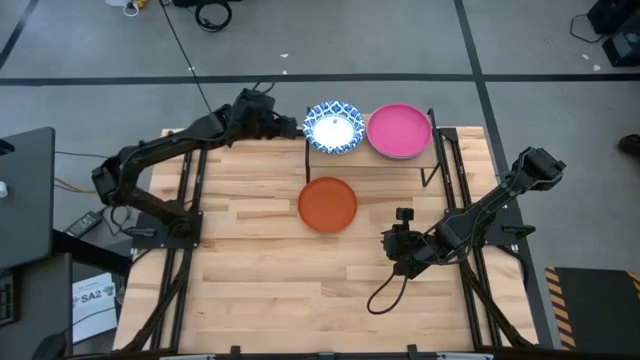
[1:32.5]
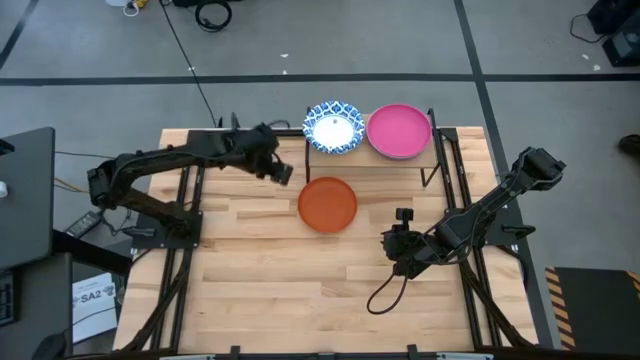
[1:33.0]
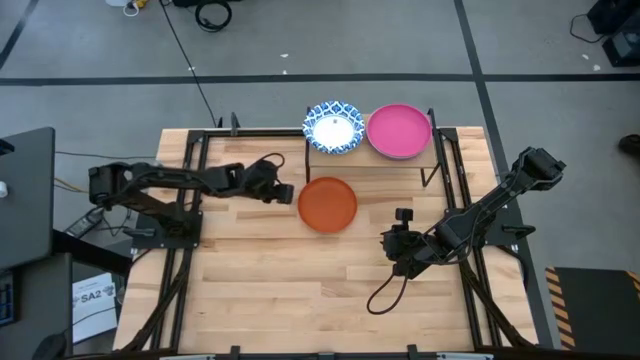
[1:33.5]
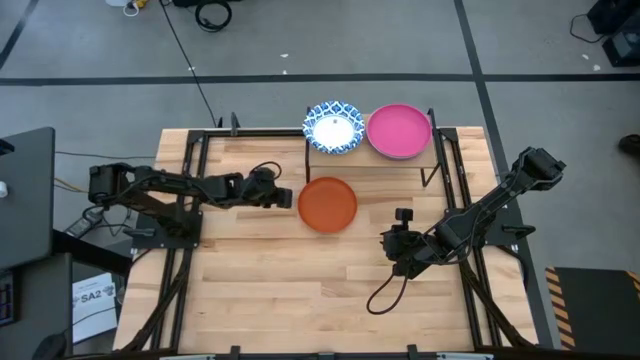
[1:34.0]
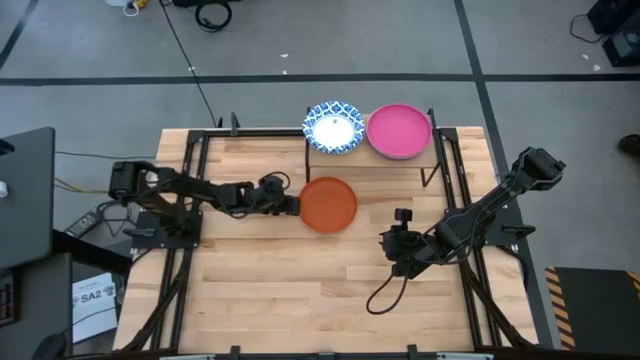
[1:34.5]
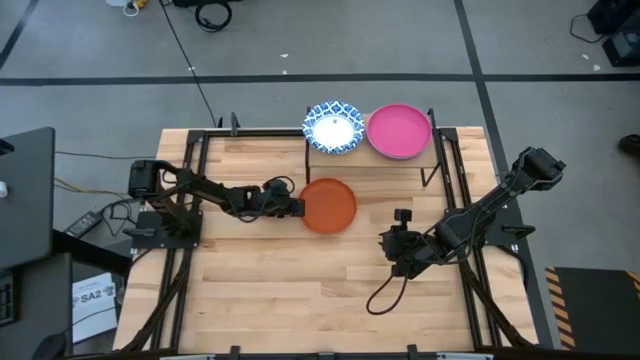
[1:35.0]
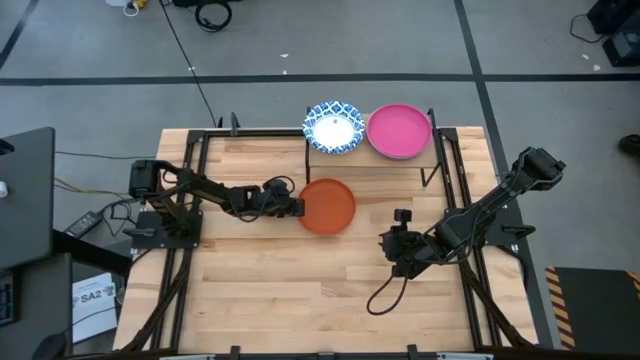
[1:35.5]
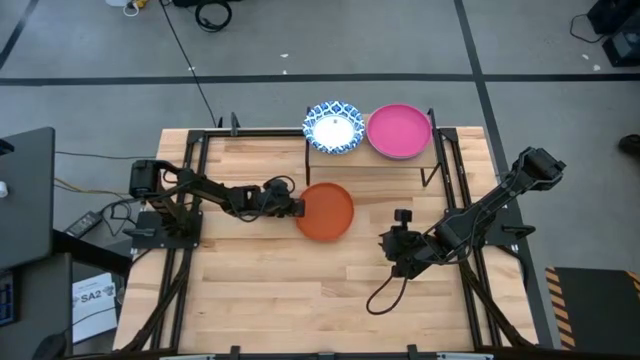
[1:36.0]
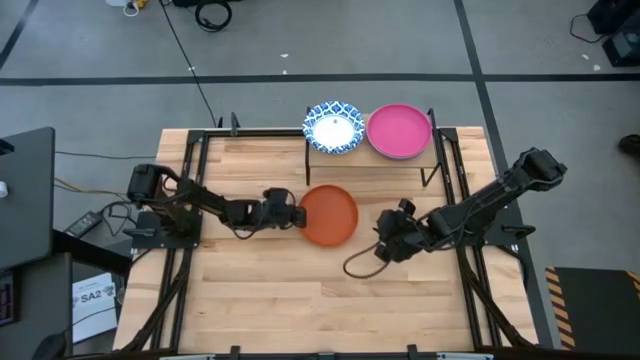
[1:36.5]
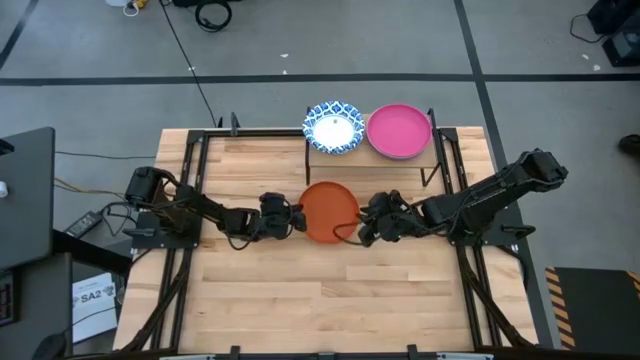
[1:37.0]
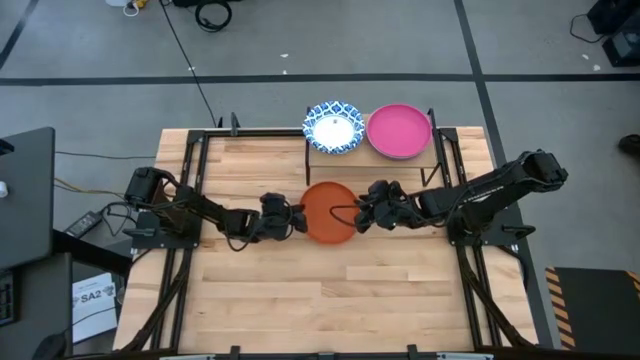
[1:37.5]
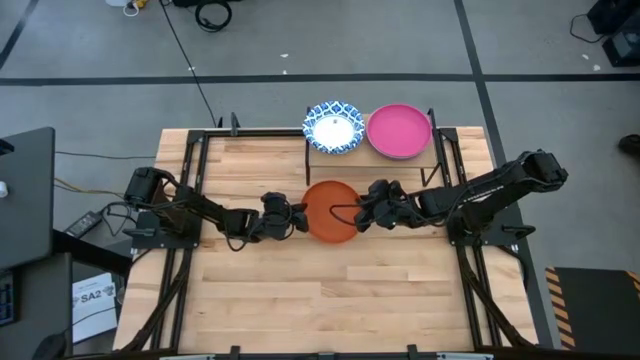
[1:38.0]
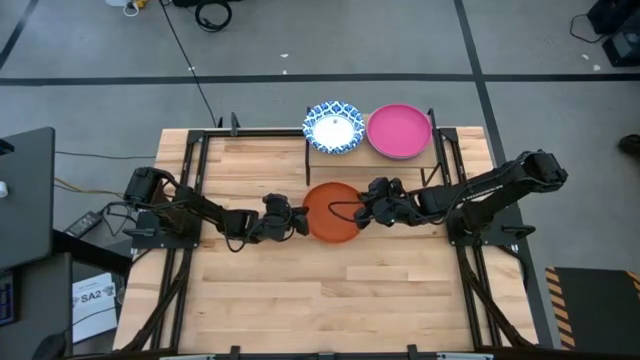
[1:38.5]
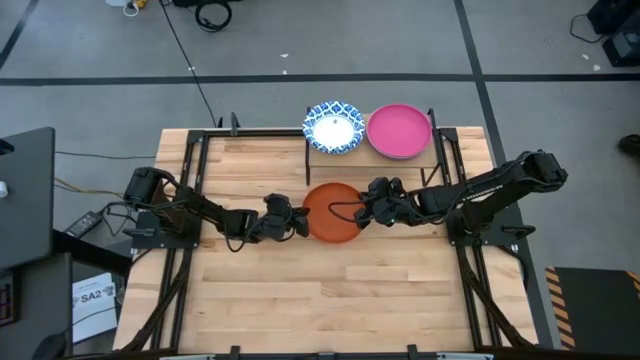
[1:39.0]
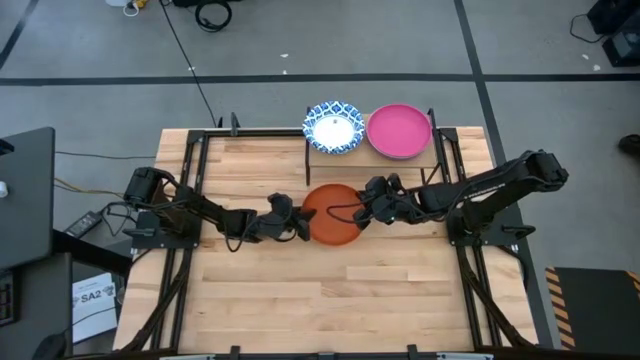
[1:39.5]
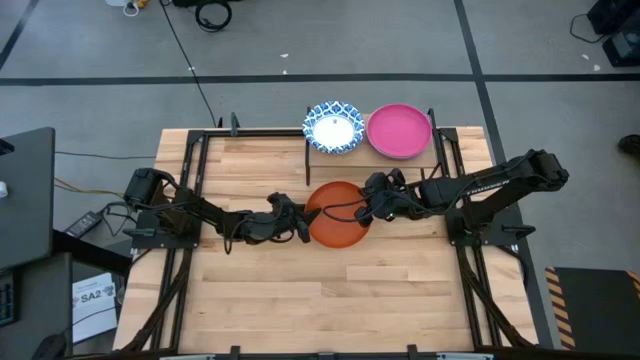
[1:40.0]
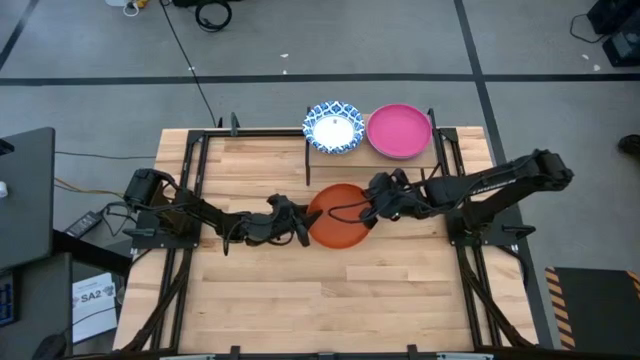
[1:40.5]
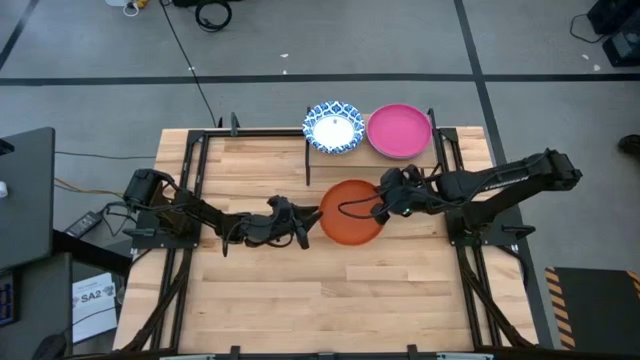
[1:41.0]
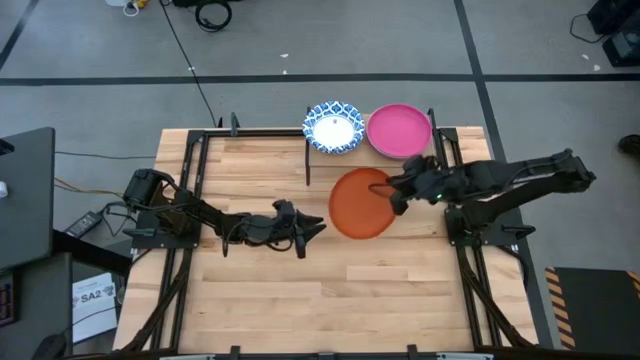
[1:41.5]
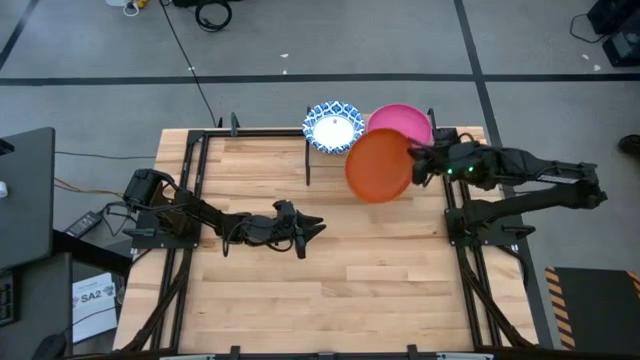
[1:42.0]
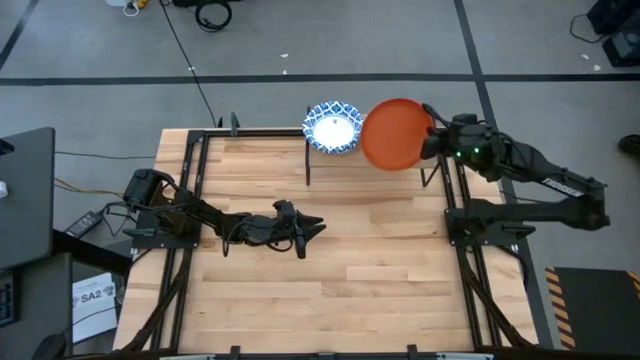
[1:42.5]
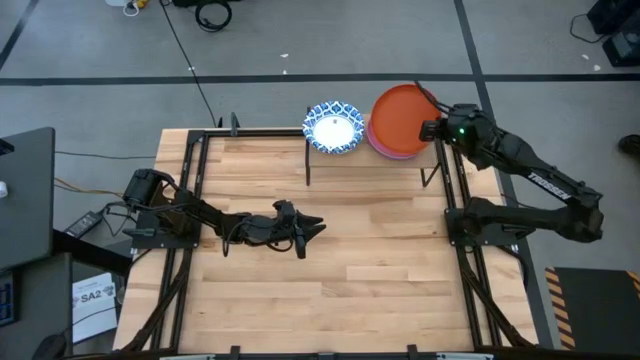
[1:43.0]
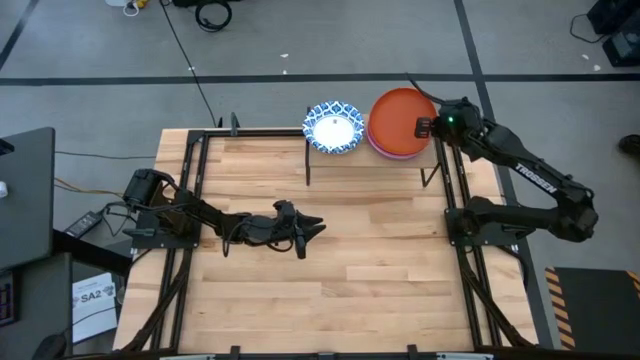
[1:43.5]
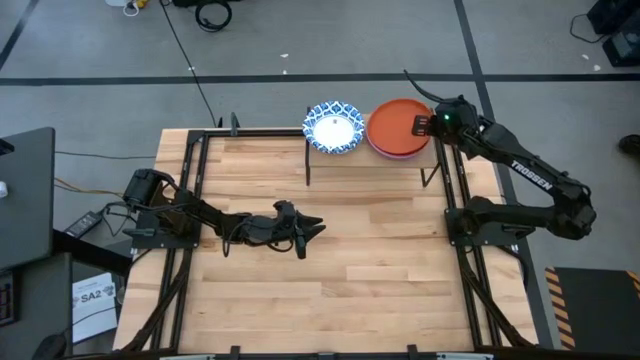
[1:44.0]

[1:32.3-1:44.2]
Task: Place and stack plates onto a shelf
Stack the orange plate on top of the pink plate on the shelf

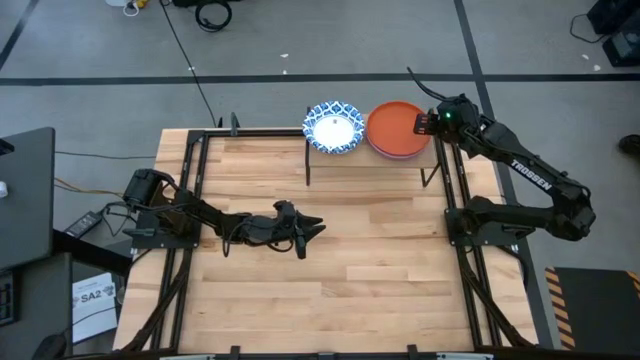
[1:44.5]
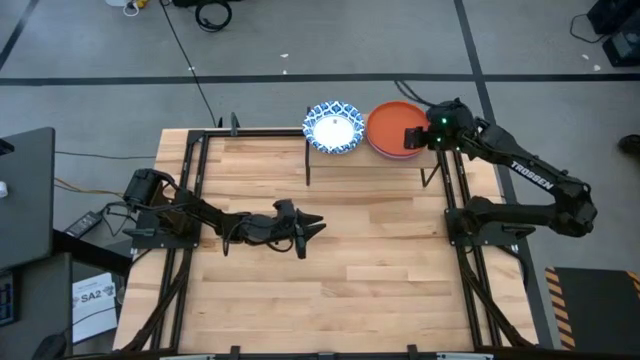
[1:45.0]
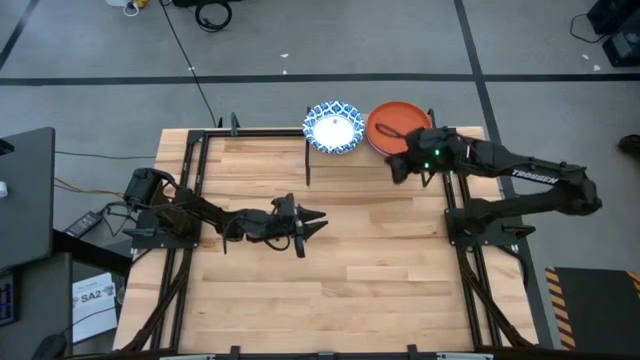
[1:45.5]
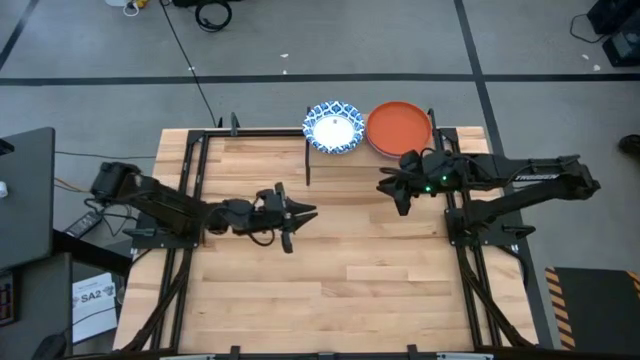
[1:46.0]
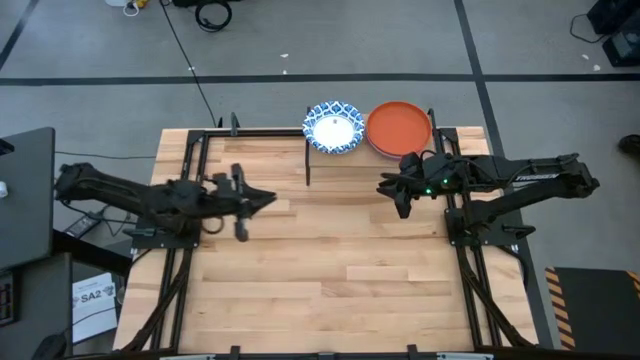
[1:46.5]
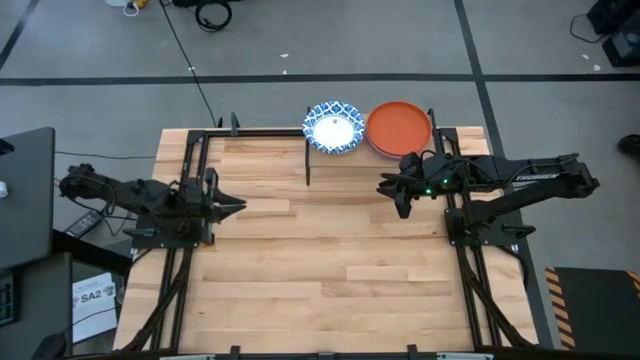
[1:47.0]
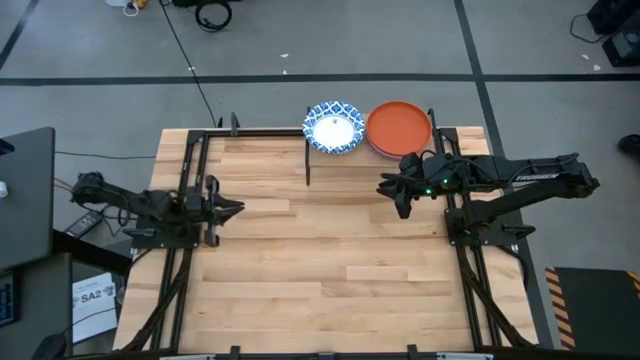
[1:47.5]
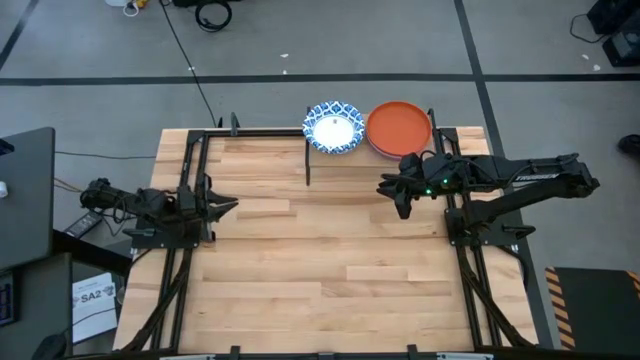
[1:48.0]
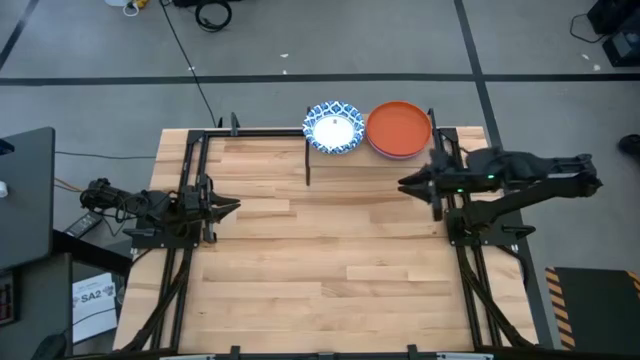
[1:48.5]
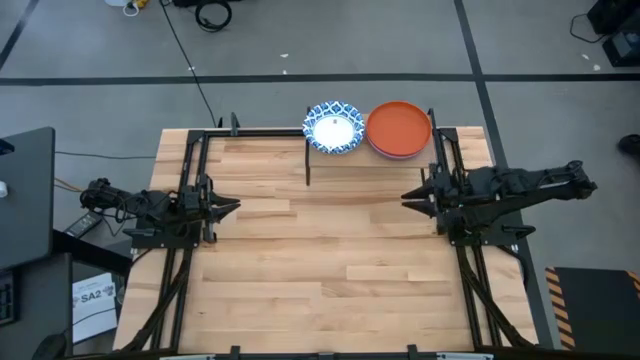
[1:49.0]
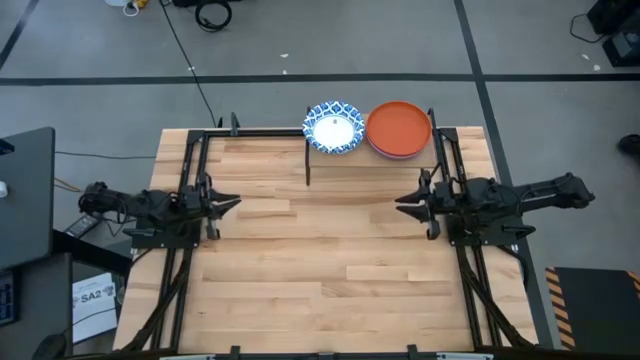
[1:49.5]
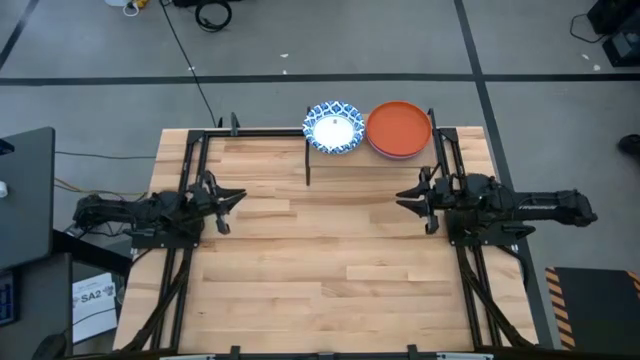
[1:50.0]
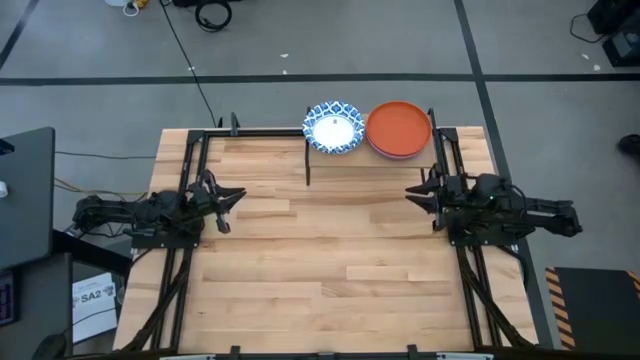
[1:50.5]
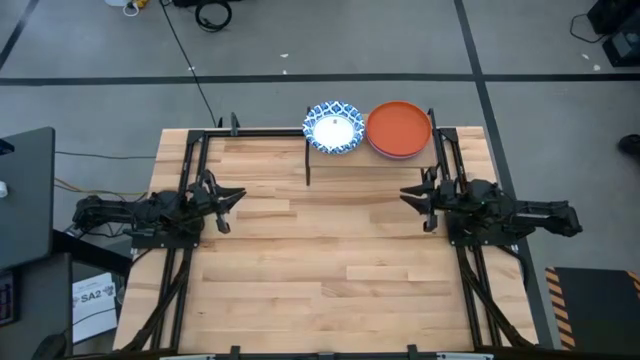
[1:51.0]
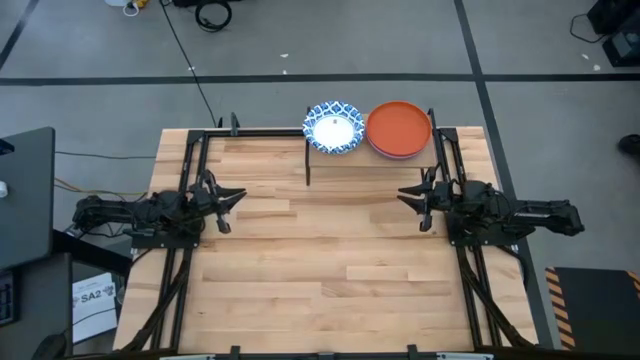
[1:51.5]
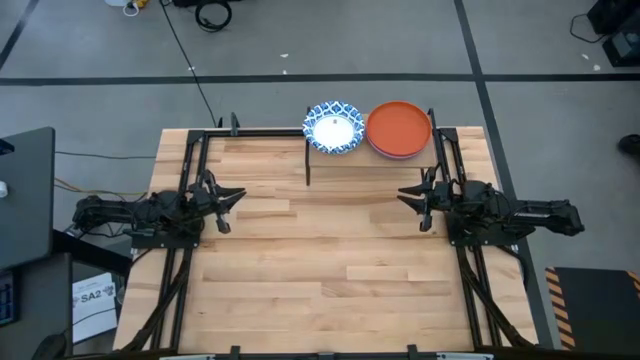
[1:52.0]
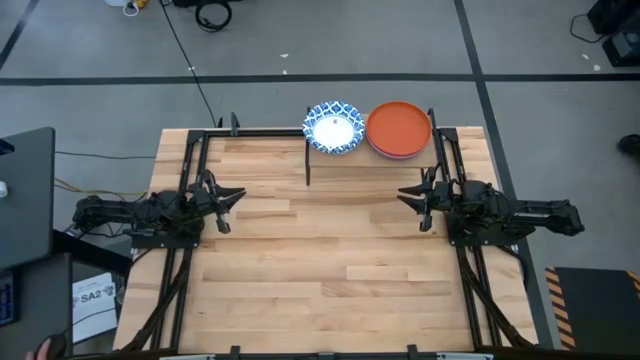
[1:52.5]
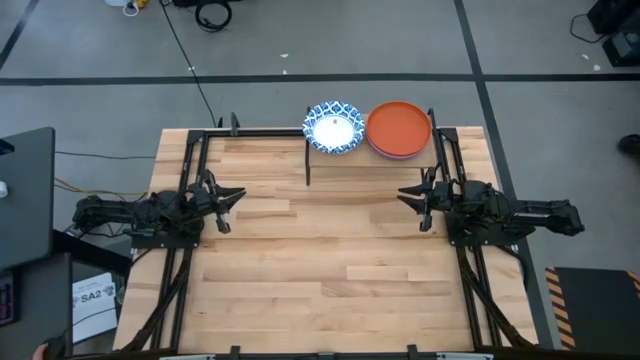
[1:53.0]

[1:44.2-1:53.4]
Return to Home Position
